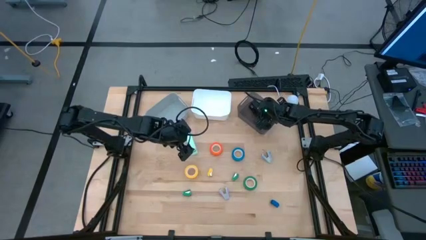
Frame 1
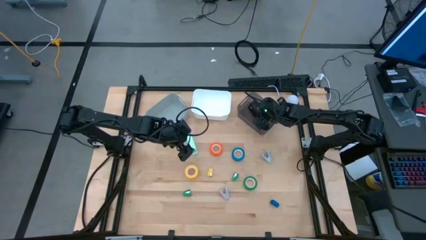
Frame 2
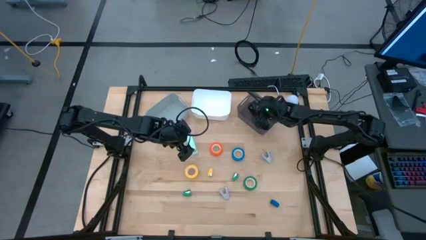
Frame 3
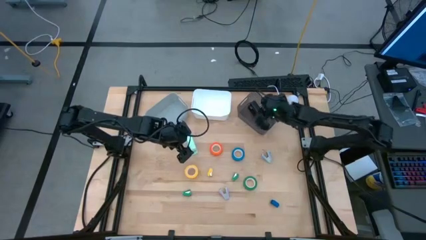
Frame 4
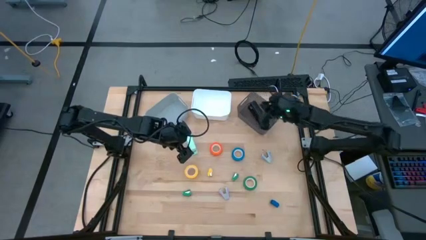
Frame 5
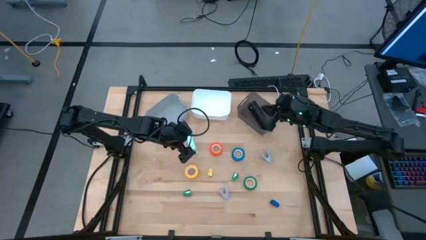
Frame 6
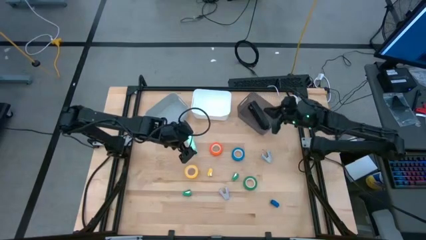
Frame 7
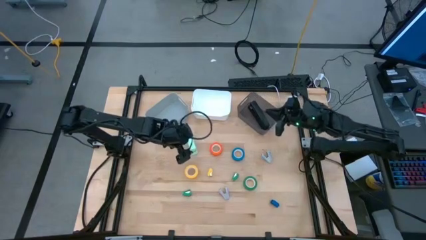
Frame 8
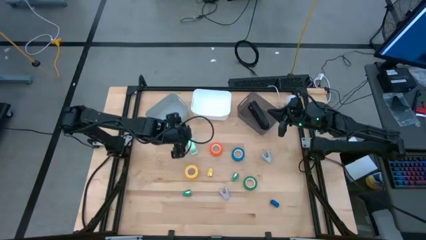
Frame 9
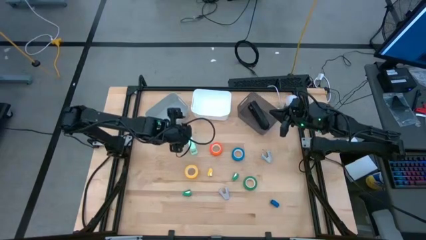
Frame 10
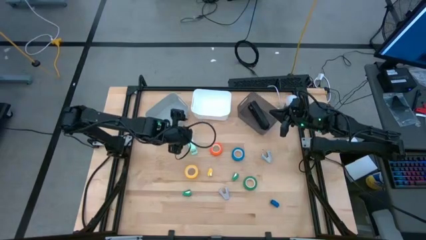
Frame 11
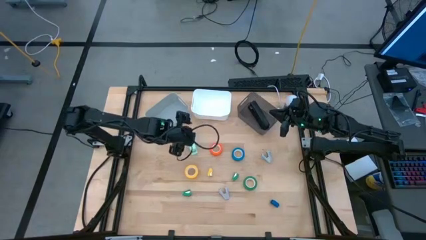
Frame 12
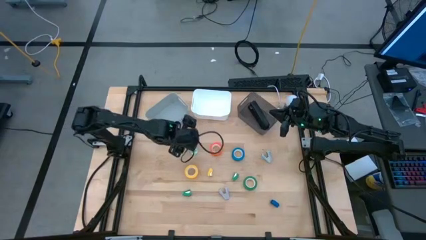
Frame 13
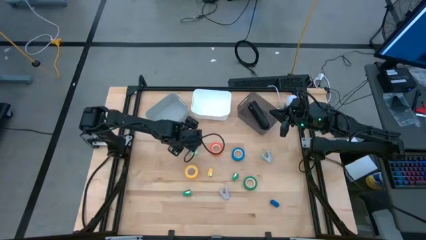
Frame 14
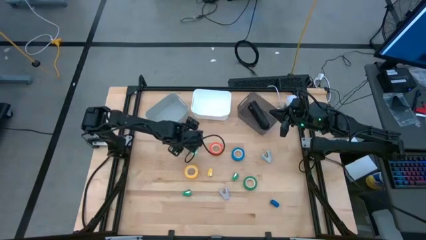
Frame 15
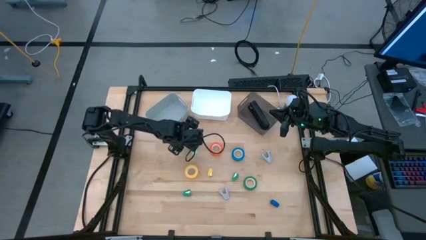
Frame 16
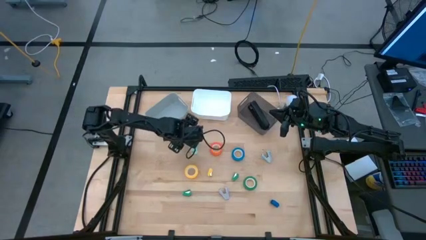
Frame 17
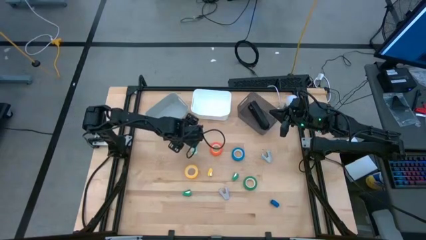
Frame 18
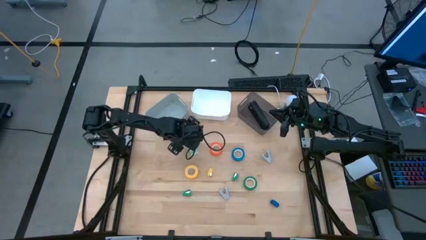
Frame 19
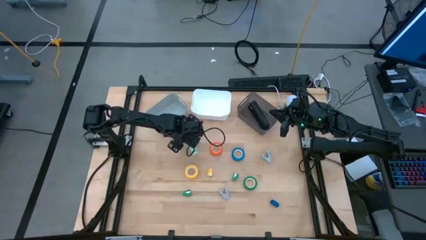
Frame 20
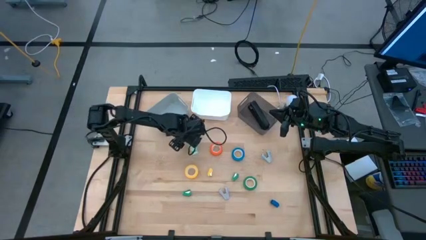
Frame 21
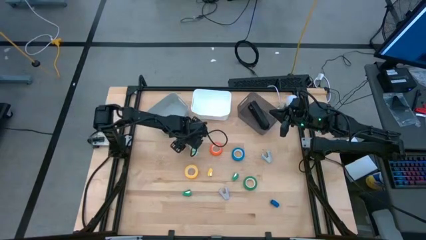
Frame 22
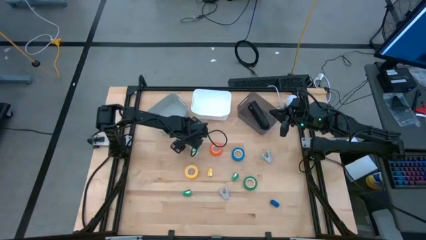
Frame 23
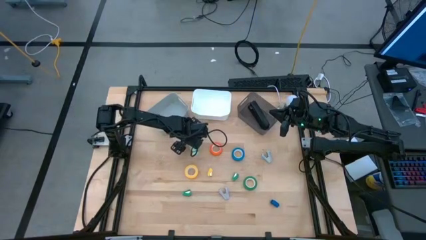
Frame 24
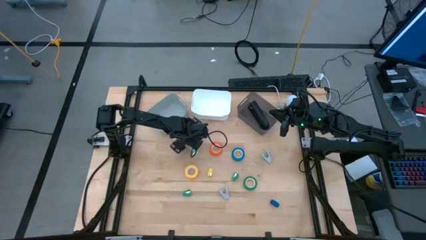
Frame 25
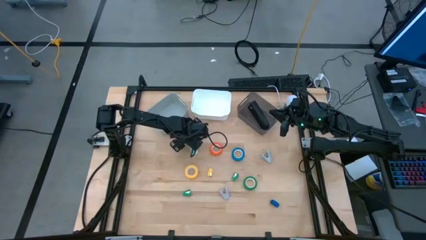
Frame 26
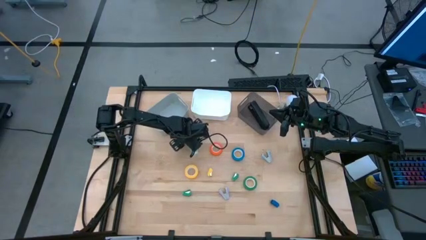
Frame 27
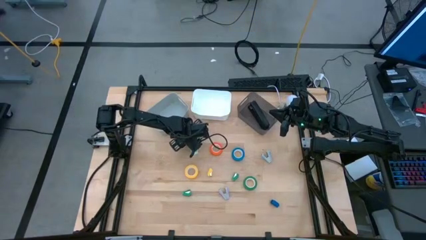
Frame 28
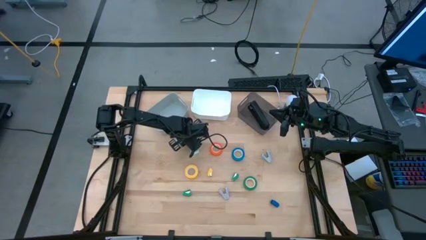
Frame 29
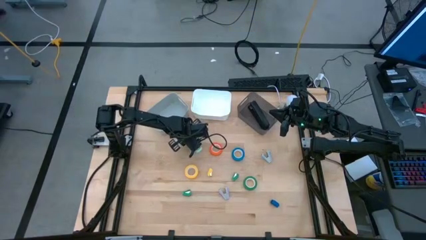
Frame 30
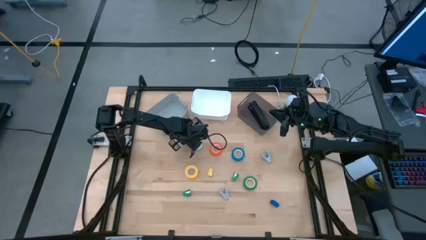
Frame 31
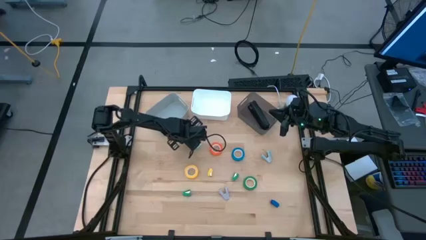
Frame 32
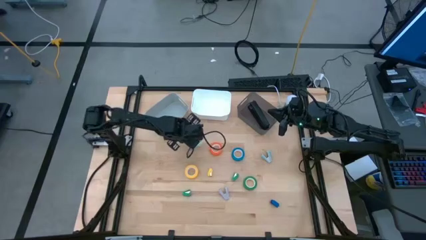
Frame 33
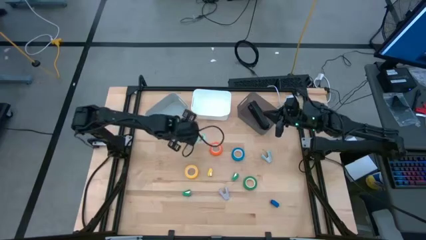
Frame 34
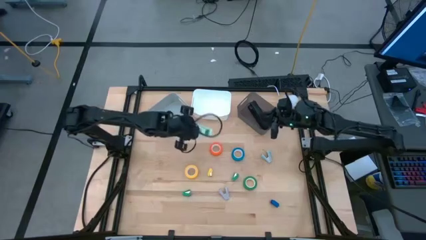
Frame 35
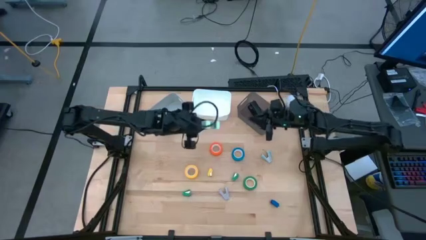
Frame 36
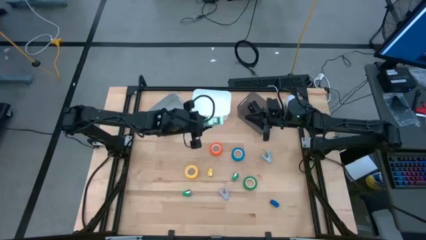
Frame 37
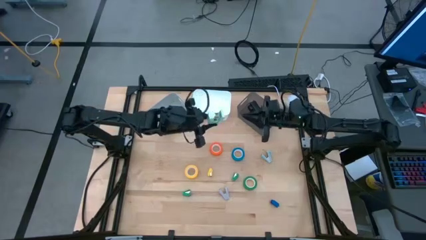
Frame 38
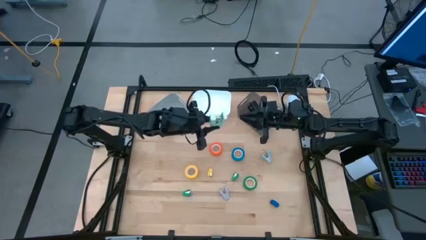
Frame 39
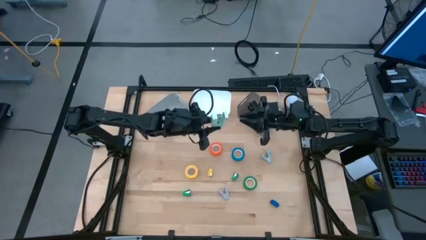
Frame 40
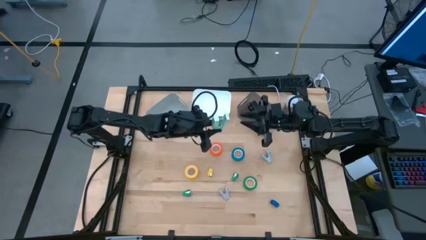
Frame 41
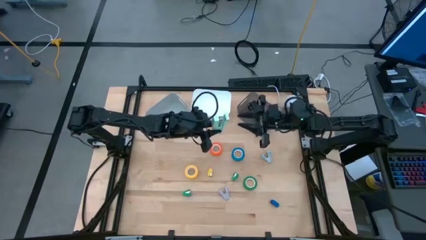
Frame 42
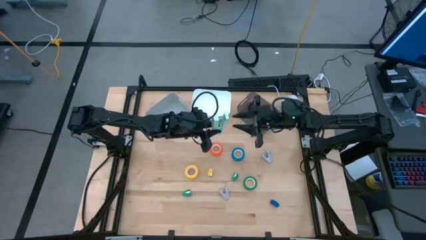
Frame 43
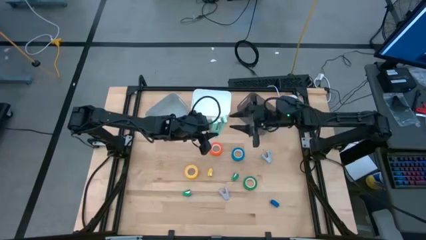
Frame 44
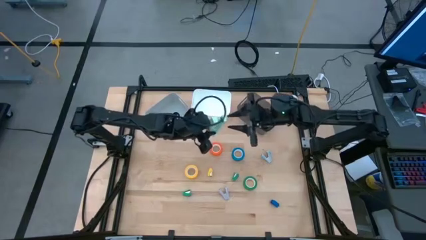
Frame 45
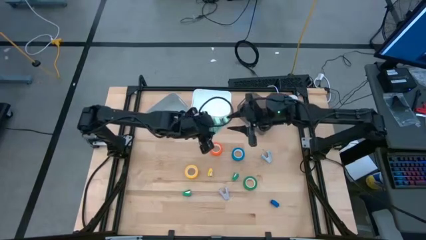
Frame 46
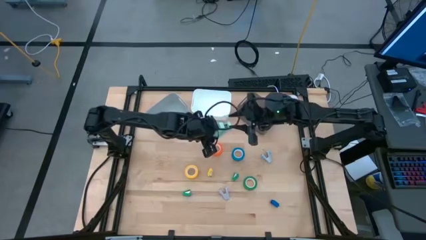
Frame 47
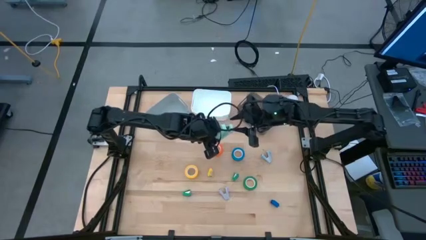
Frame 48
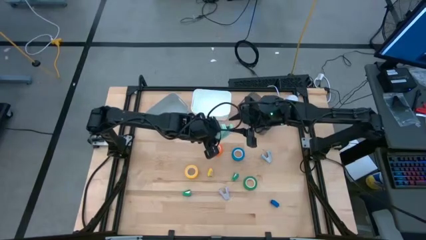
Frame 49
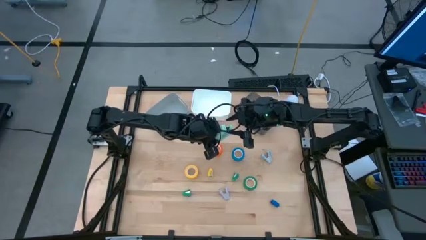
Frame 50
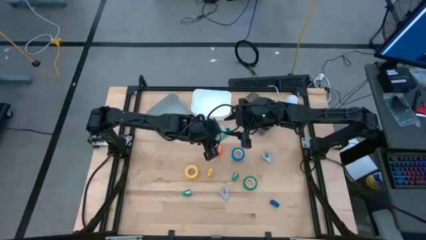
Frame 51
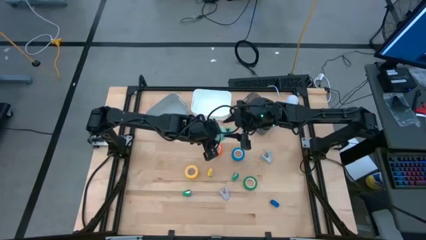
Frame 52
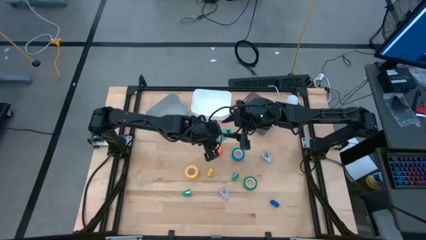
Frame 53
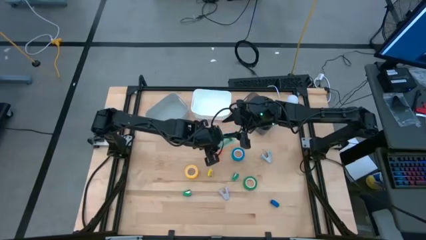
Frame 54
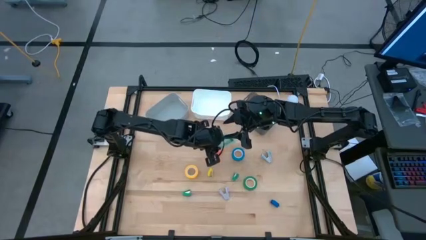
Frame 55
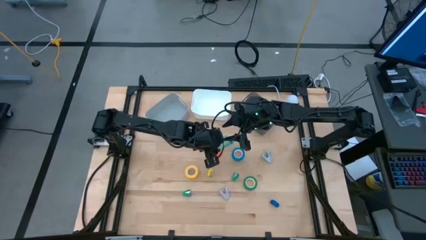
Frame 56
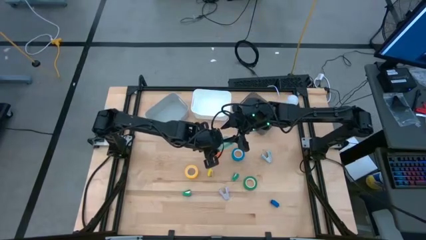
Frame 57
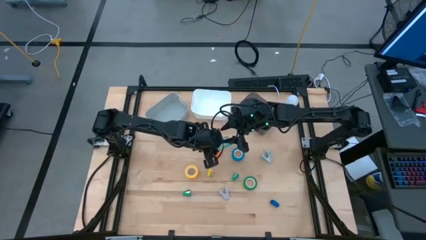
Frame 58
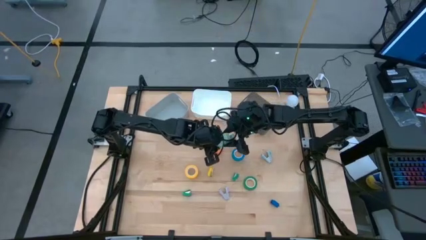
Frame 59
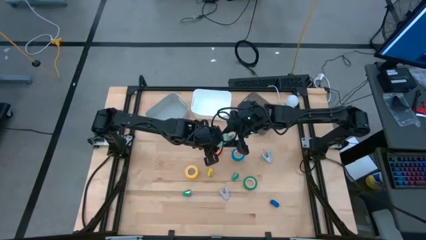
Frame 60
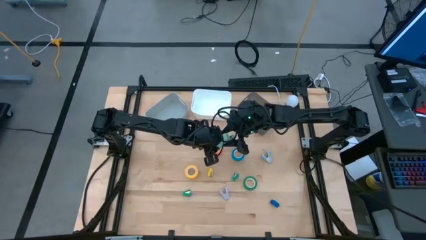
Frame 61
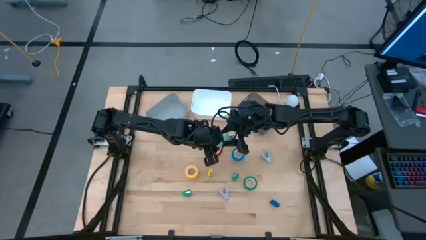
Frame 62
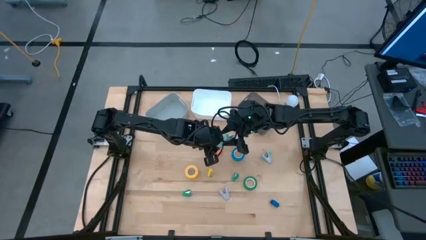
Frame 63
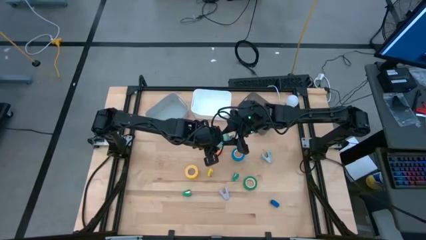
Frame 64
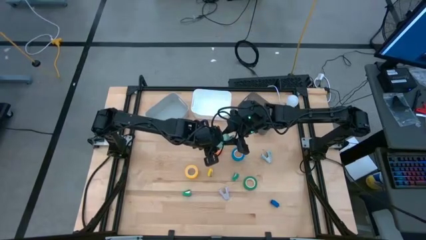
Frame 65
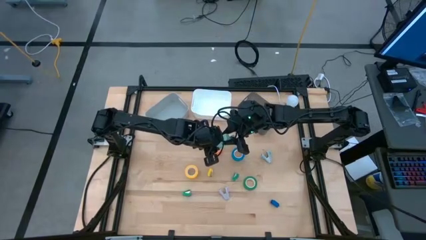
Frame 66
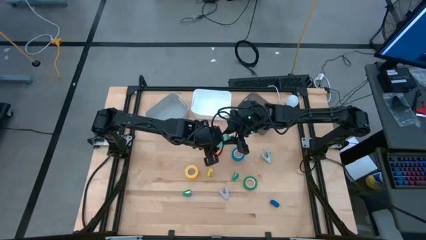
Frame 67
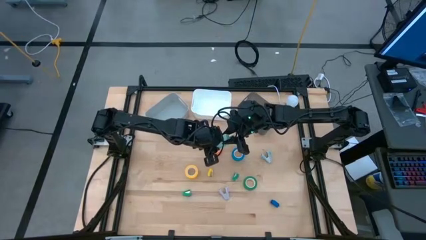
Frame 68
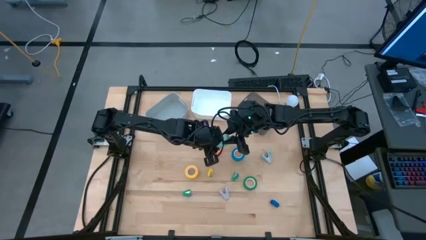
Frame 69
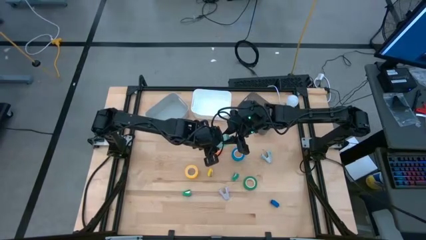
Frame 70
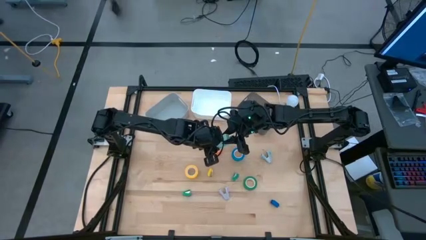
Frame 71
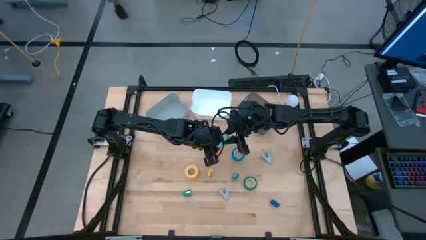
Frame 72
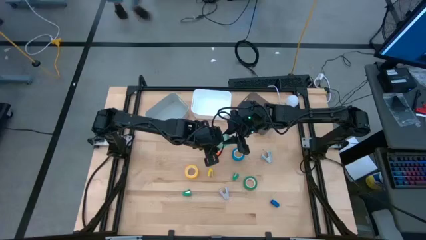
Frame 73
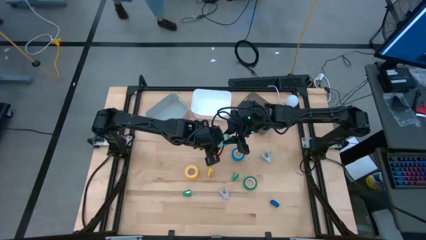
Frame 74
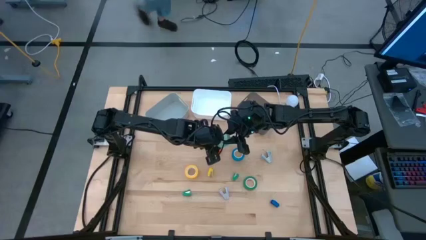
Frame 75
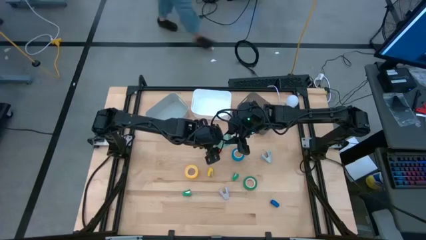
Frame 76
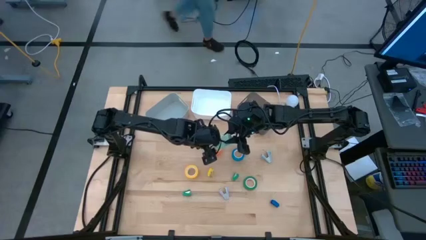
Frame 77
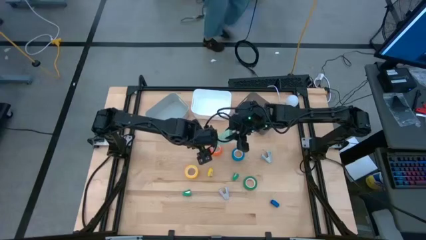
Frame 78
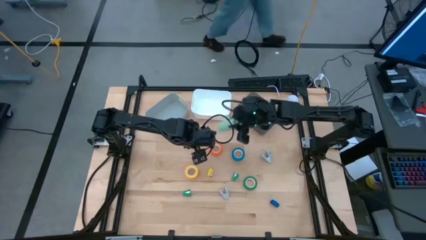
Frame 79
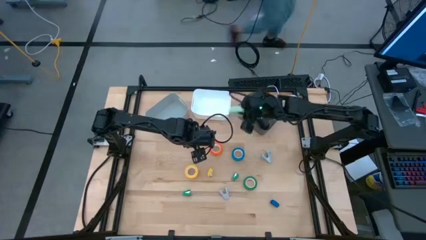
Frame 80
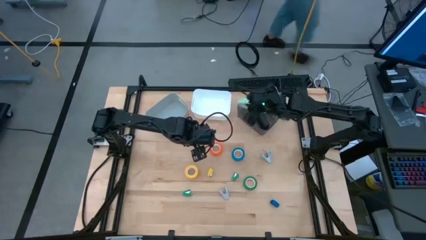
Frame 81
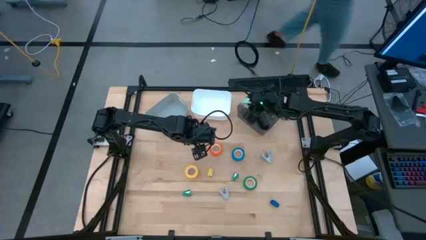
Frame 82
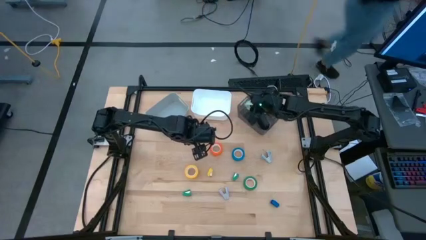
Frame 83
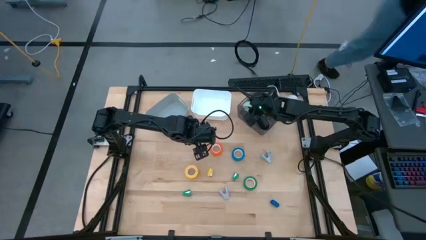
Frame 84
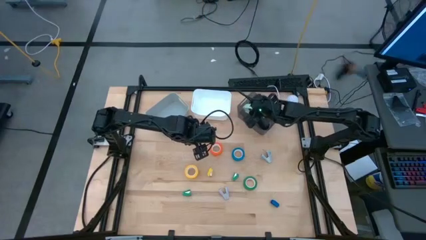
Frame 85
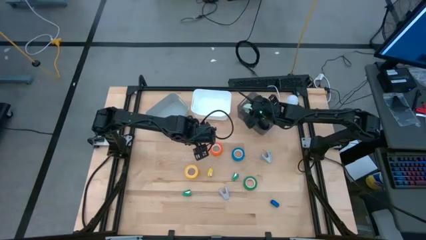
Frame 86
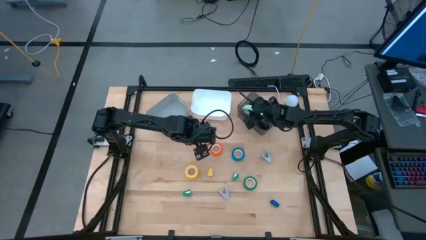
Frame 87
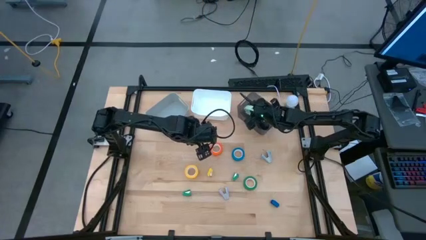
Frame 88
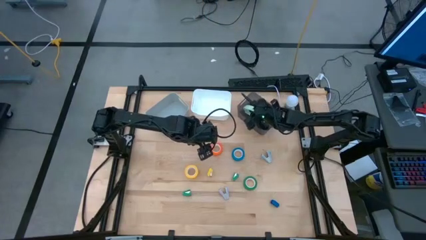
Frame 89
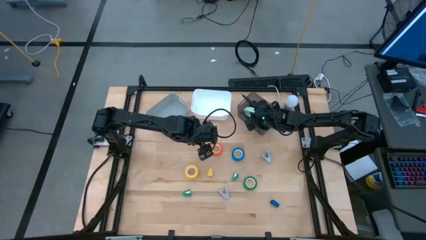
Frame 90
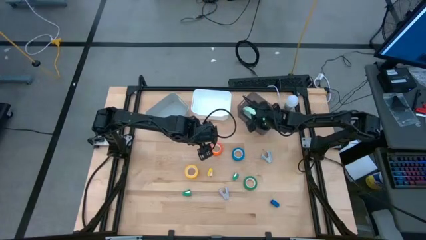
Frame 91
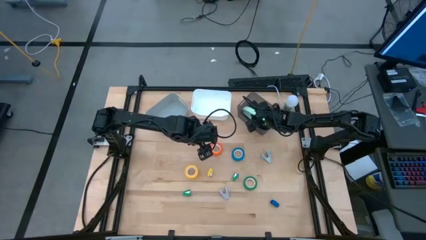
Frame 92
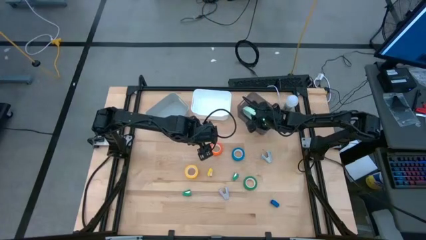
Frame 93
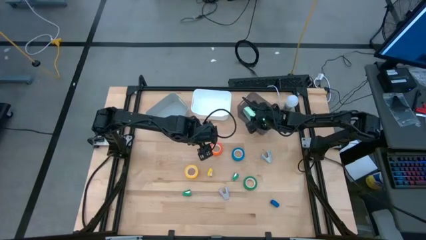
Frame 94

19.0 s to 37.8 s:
Task: Pick and place Stapler, Stapler remover, tape
Put the large light green stapler into the black bin
